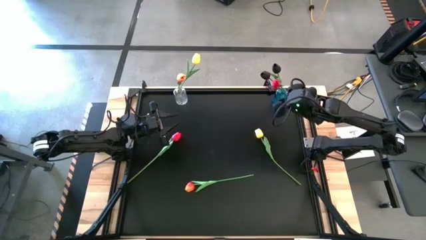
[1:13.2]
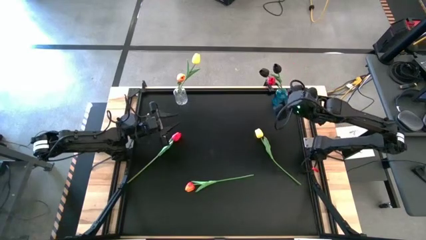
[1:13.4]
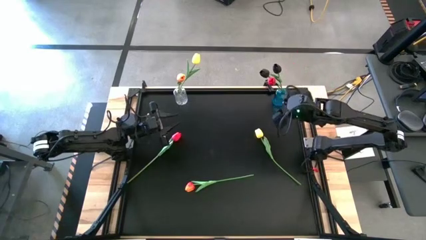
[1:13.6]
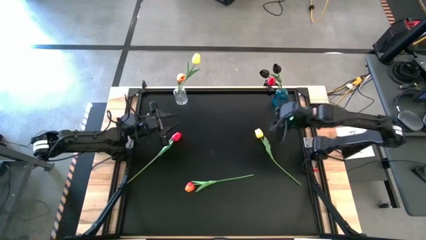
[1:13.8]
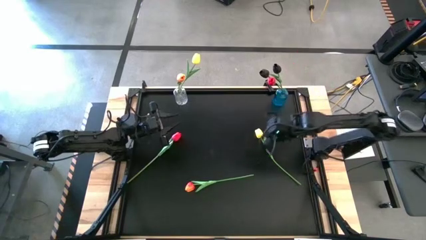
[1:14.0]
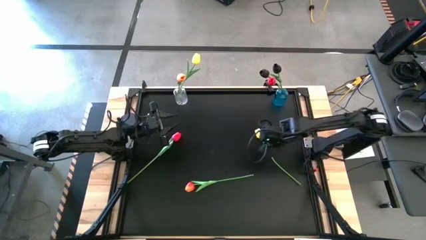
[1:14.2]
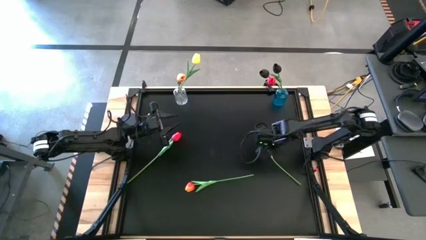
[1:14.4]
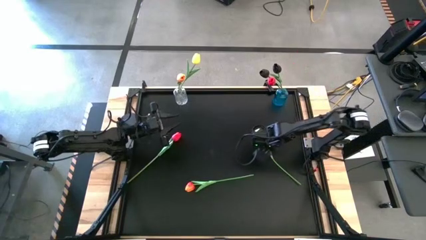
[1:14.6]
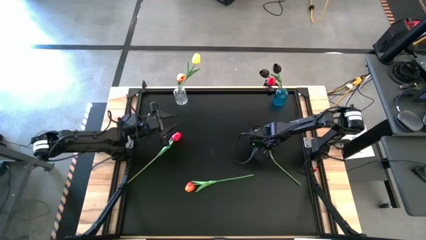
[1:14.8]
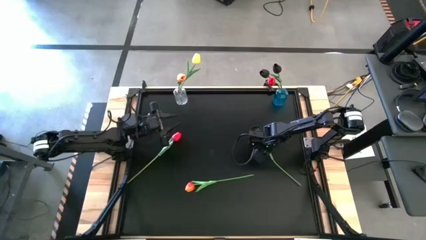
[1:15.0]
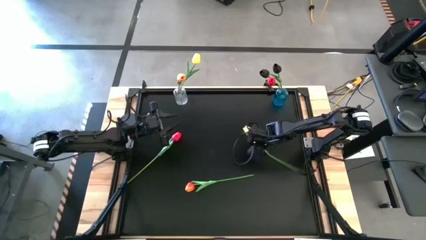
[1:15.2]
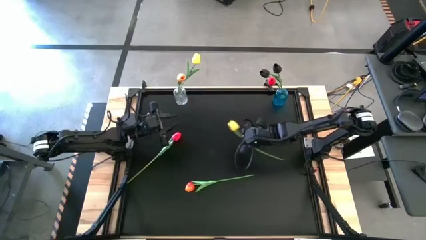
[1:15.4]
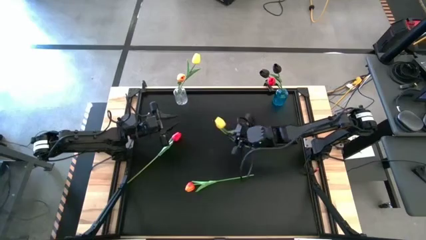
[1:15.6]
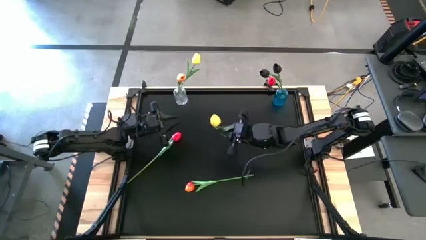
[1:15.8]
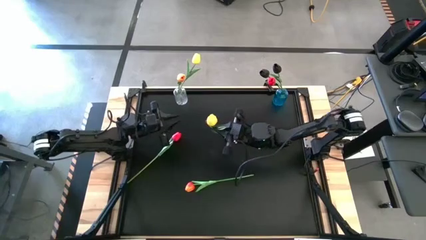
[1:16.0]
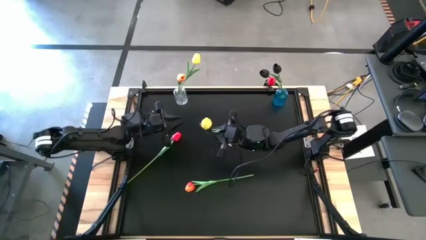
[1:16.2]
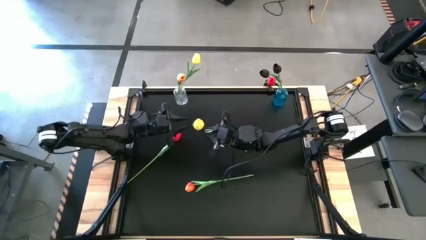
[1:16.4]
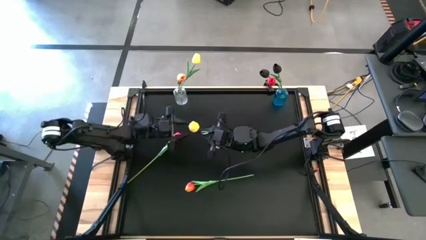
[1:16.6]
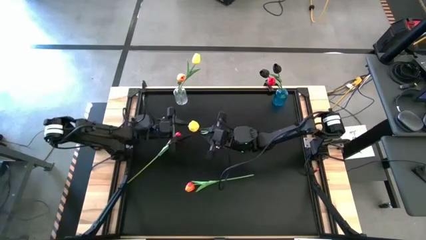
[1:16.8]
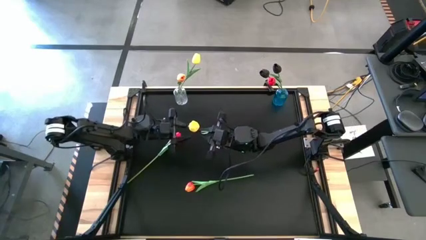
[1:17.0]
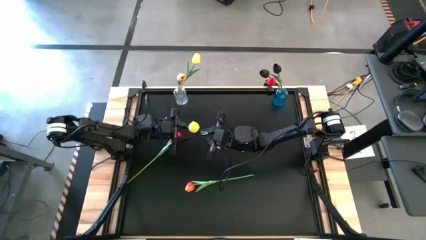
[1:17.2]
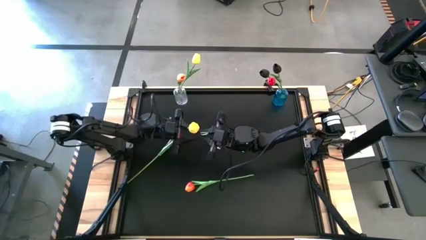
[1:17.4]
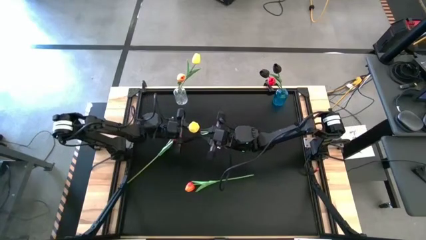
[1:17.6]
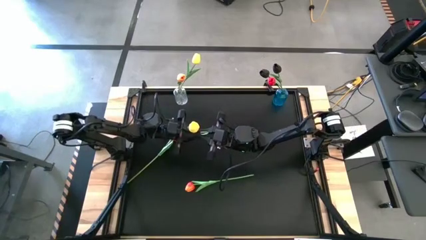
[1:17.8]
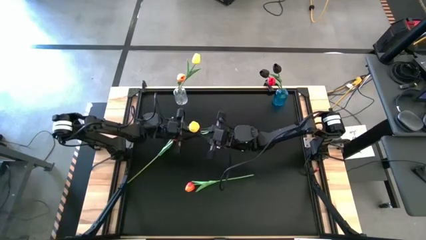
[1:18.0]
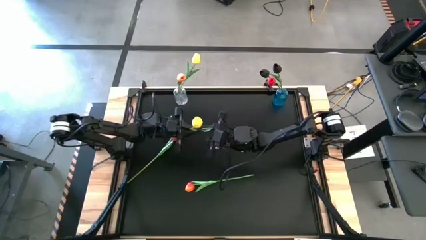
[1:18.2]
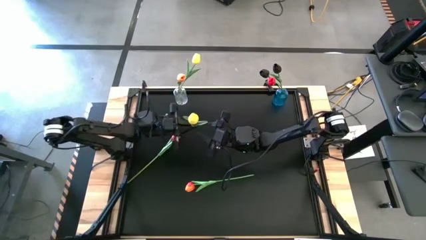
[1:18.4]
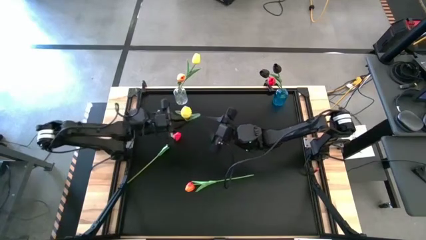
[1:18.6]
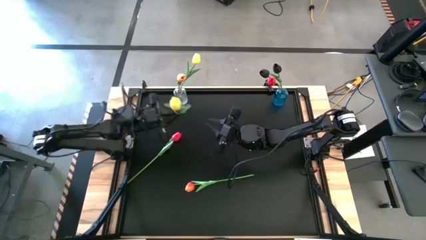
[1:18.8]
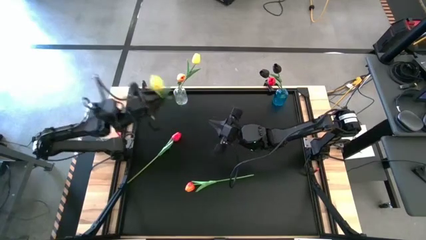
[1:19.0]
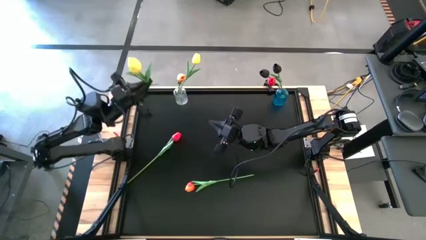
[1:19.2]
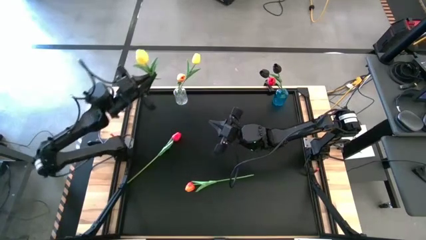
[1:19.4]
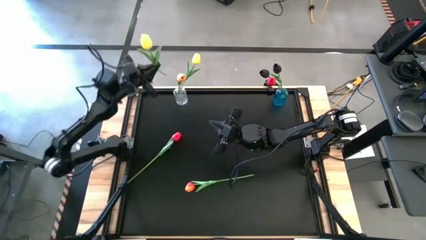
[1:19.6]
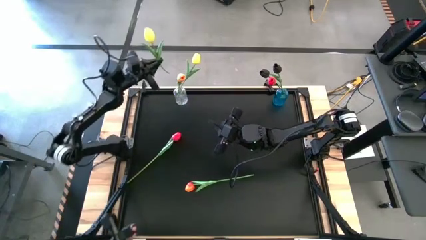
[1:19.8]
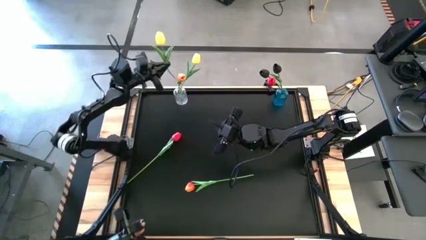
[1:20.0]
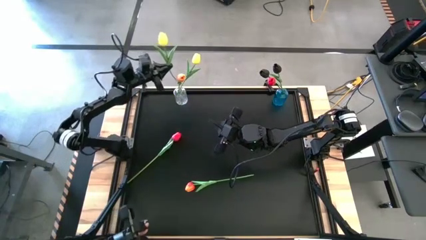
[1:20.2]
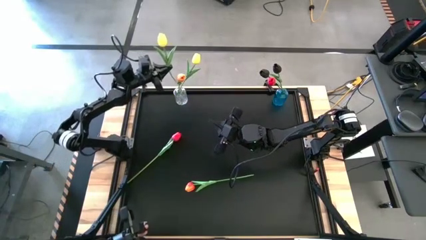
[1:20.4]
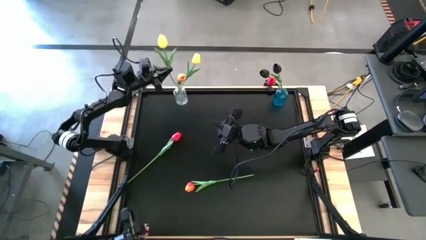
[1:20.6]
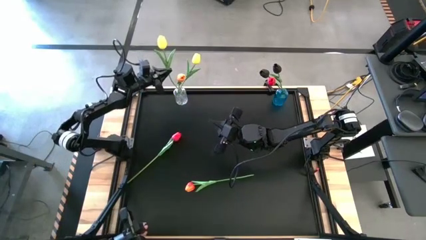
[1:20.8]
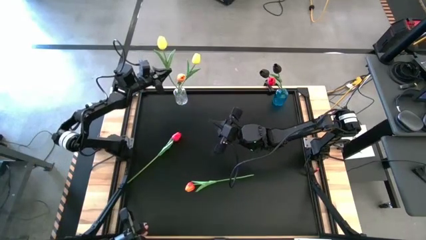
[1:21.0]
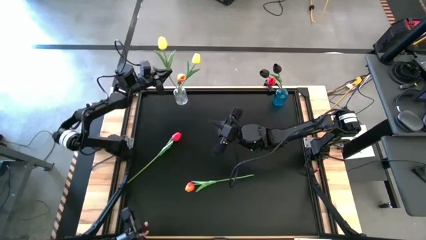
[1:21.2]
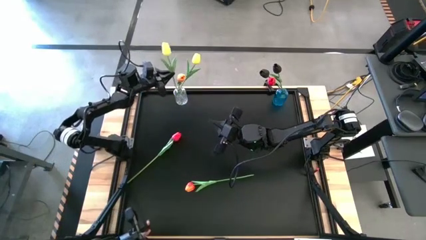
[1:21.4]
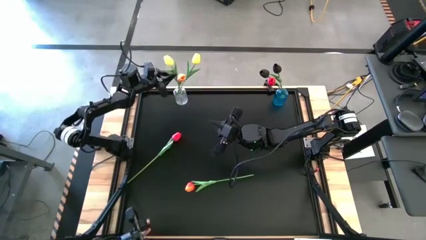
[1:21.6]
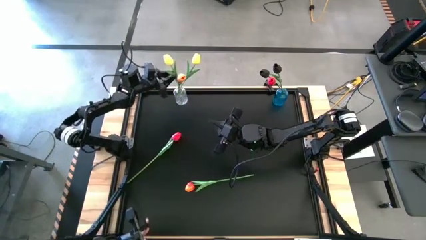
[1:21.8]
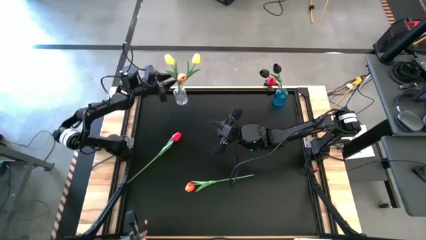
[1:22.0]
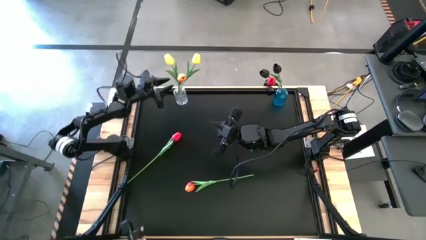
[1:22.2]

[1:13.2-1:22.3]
Task: Sort flowers into vase by color
Put the yellow flower into the transparent vase

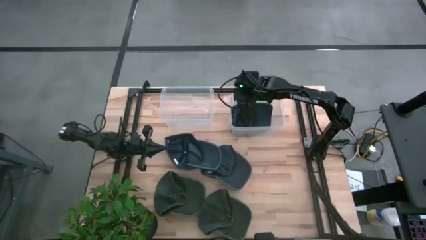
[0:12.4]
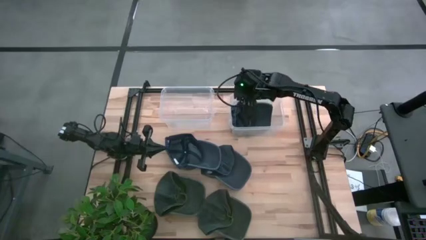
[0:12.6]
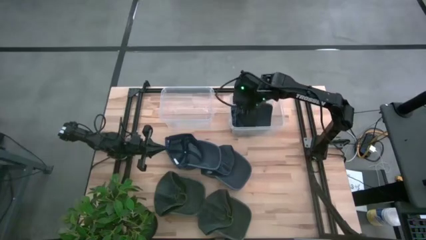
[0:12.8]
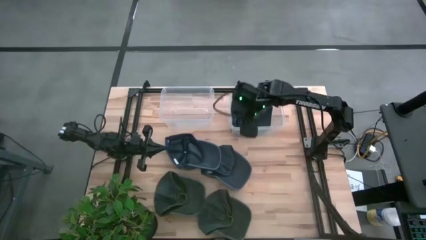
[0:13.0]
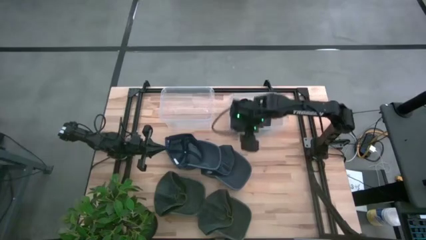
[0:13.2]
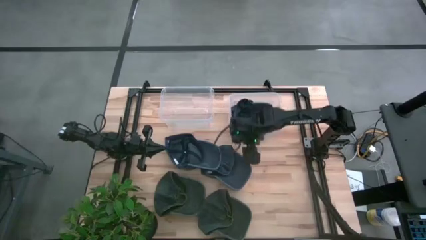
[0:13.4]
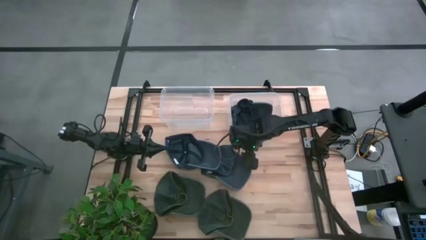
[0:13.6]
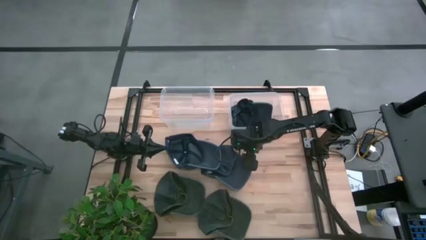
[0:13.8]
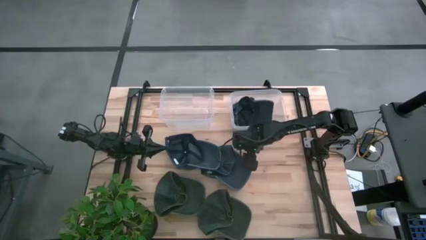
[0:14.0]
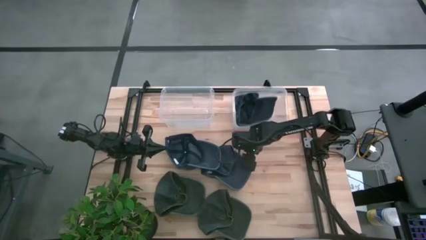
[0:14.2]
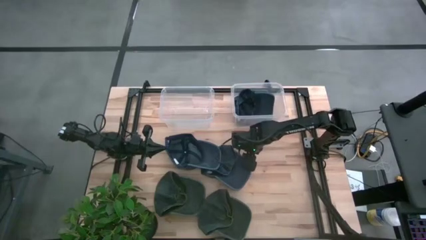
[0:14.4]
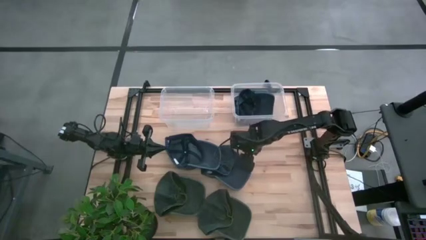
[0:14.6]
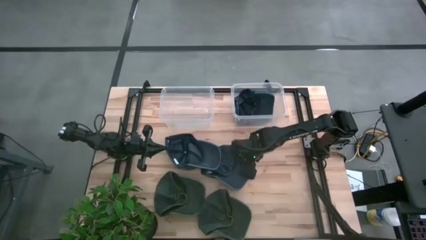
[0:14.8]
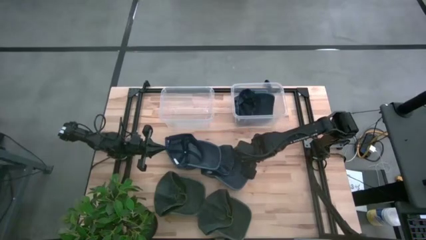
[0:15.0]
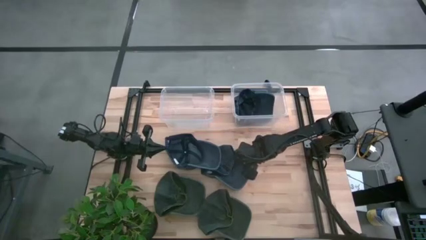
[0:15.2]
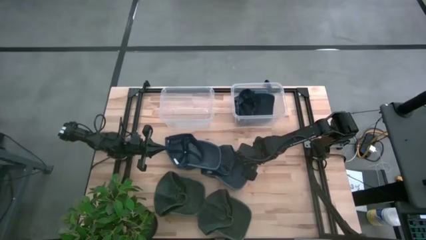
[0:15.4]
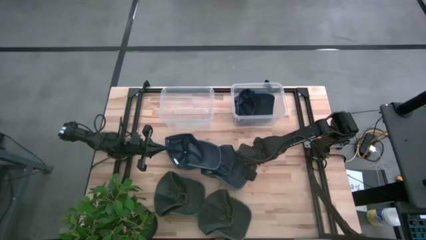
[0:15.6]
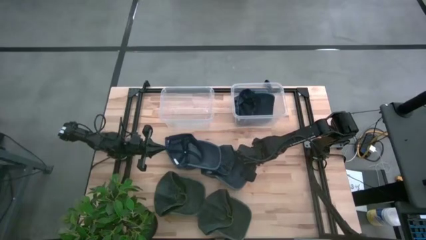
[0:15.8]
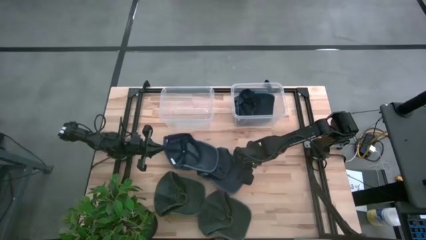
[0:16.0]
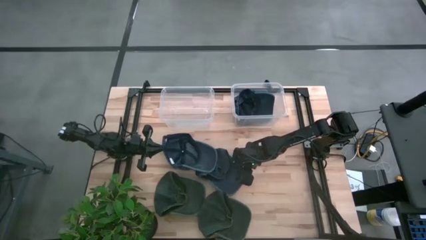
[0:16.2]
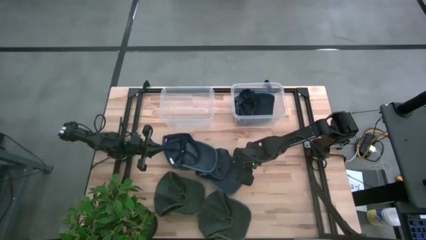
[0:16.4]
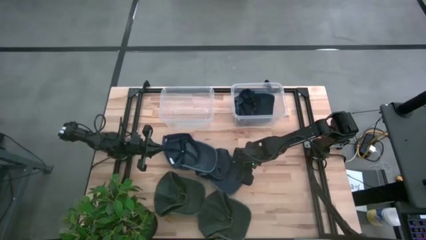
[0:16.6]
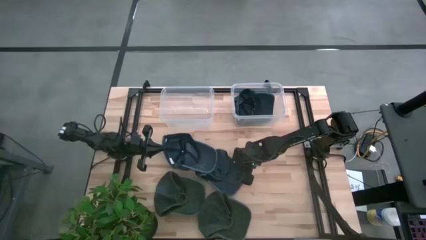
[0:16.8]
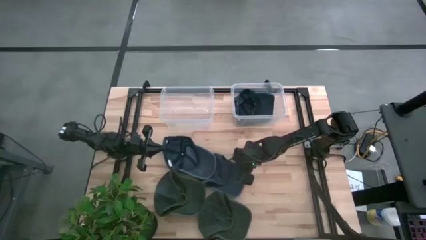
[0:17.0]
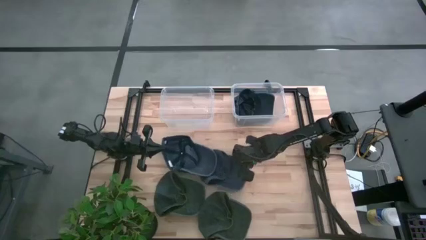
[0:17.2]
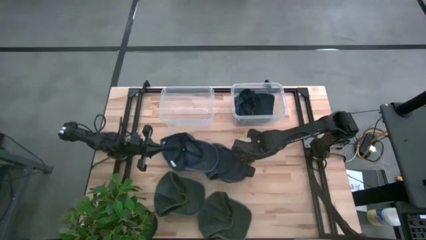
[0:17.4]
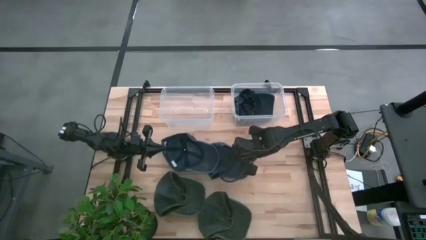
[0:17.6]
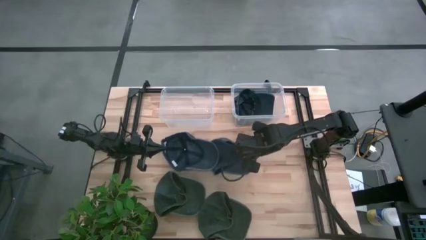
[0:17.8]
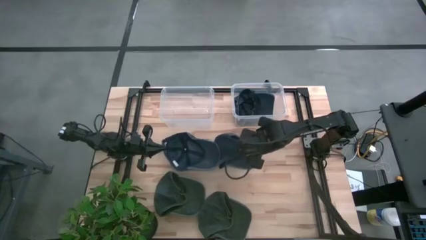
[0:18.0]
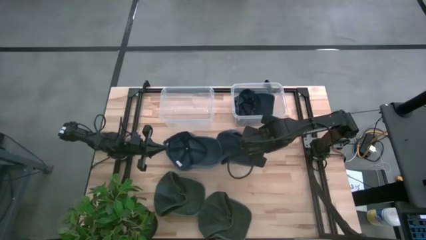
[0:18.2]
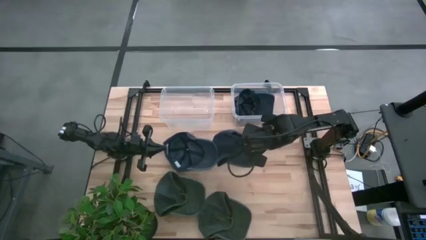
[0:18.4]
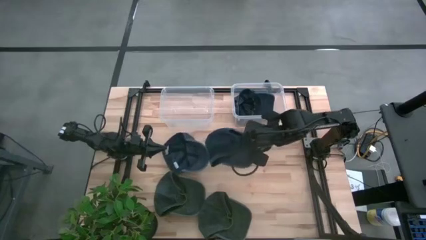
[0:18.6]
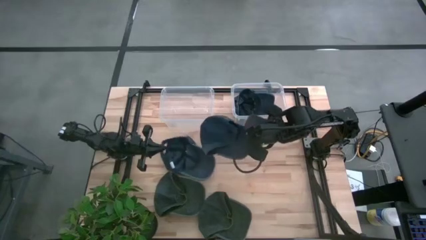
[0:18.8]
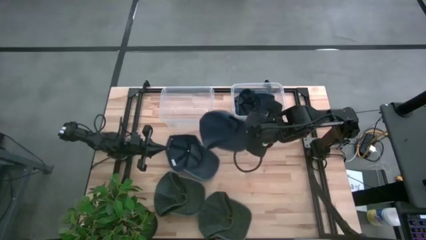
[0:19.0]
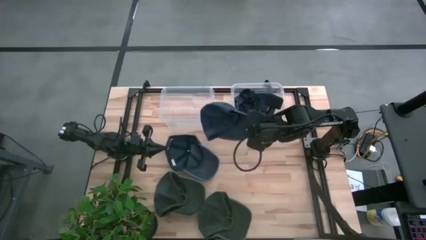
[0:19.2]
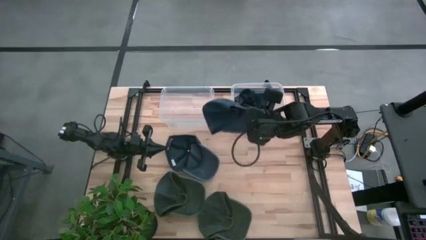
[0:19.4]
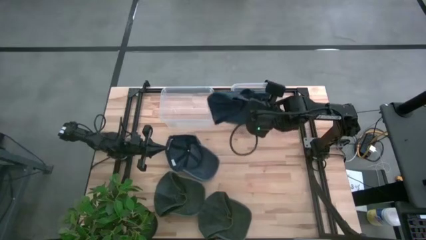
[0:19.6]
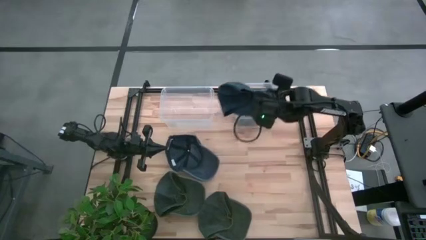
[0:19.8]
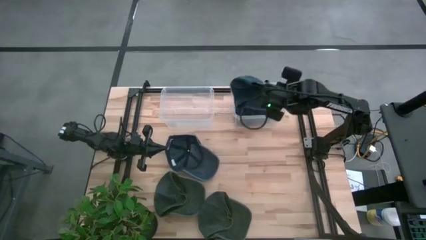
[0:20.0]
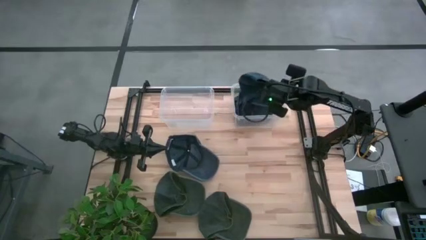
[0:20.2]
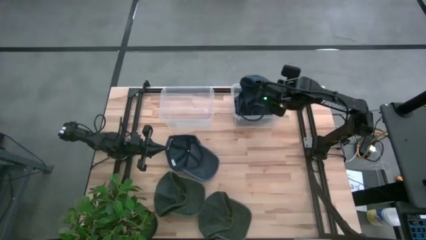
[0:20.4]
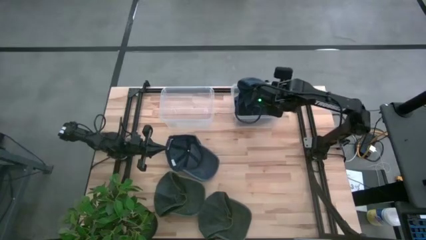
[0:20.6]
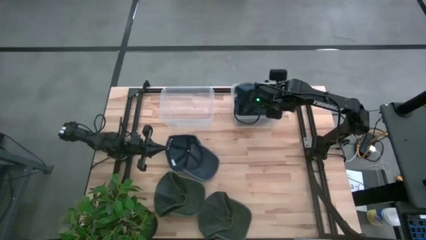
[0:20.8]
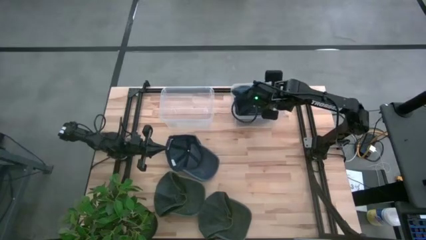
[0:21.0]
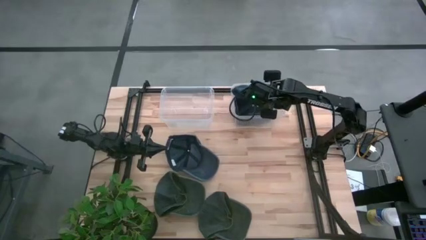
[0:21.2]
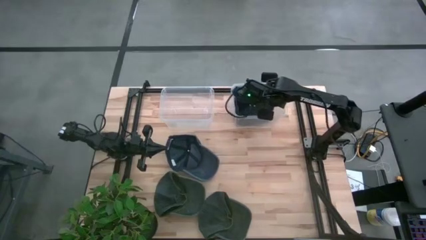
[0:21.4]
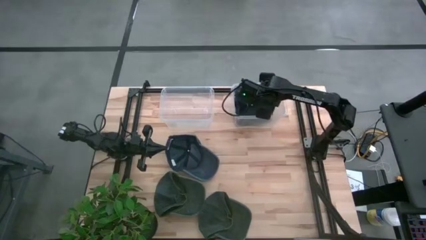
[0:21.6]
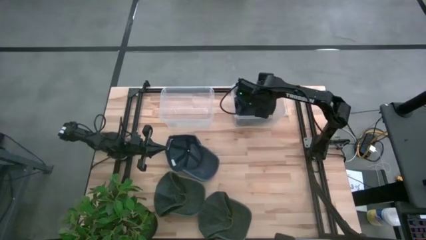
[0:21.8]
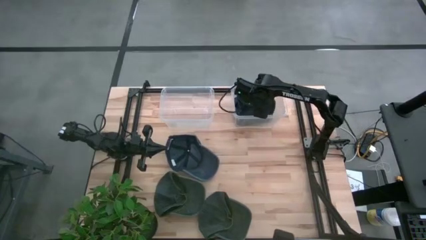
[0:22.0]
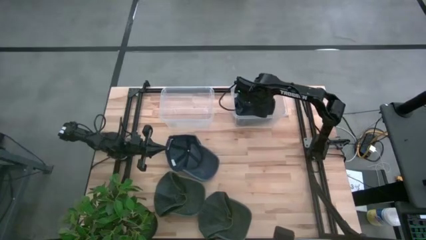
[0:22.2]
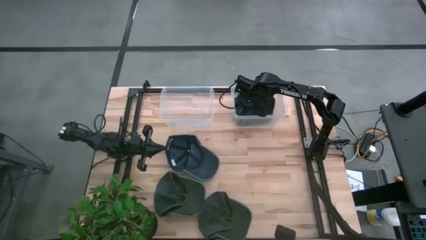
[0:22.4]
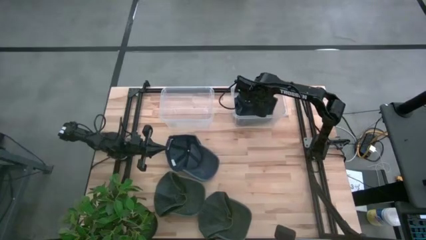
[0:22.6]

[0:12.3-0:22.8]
Task: Pick & Place hat
Put the right blue cap into the right transparent bin
